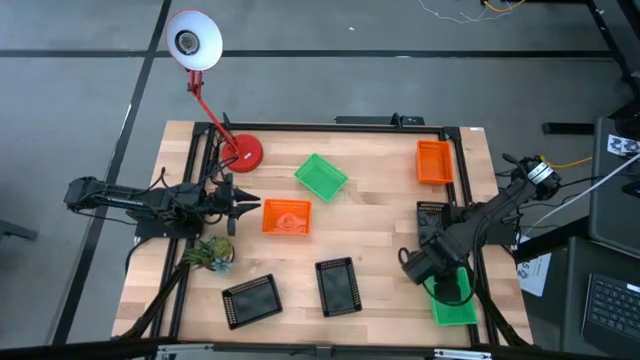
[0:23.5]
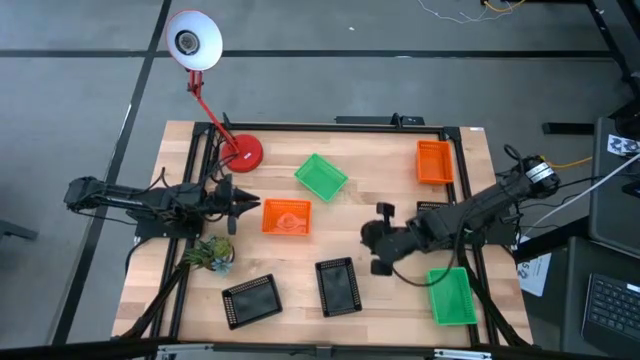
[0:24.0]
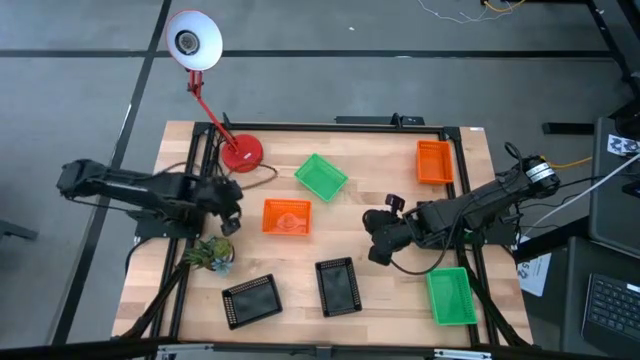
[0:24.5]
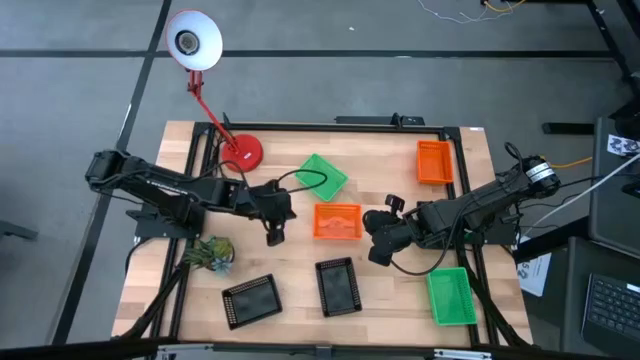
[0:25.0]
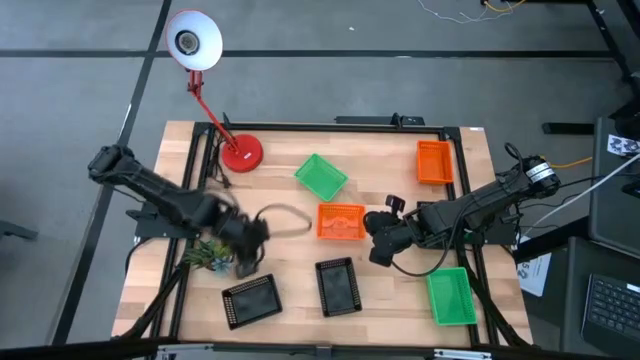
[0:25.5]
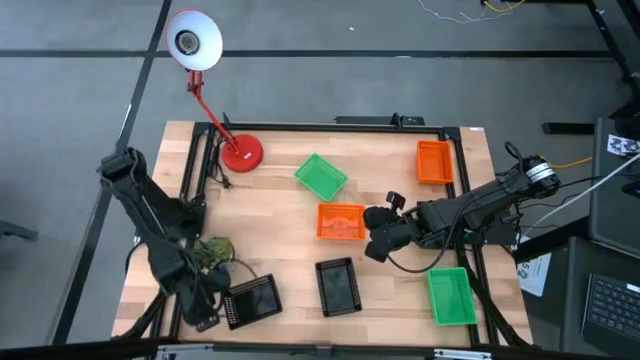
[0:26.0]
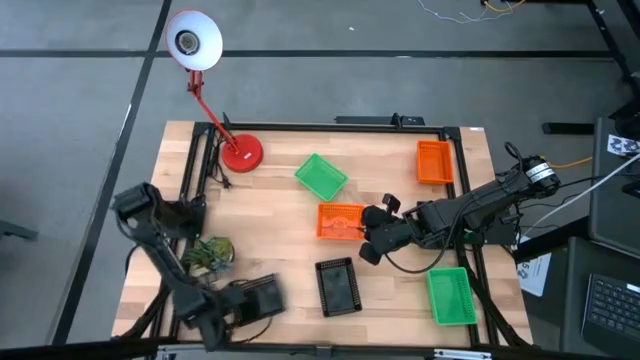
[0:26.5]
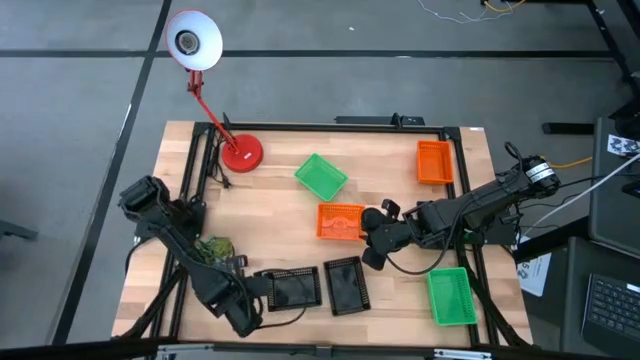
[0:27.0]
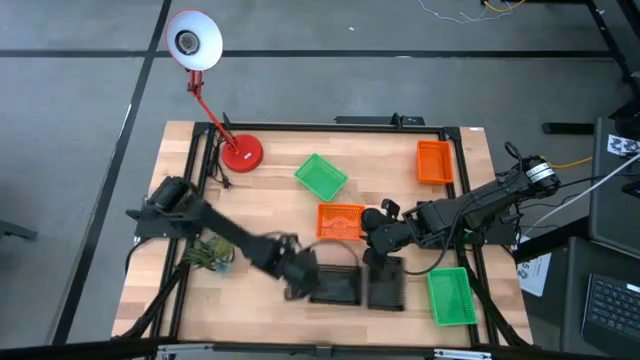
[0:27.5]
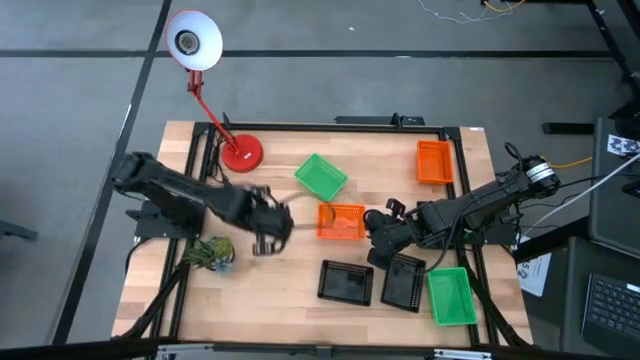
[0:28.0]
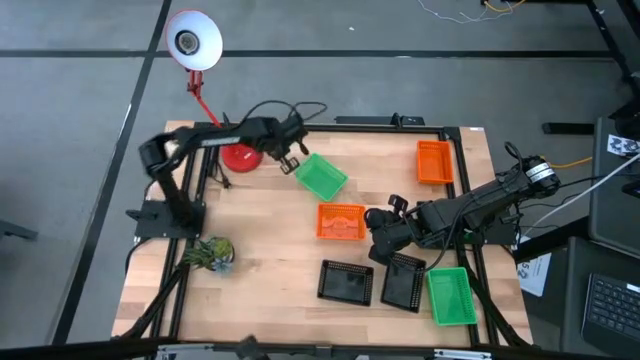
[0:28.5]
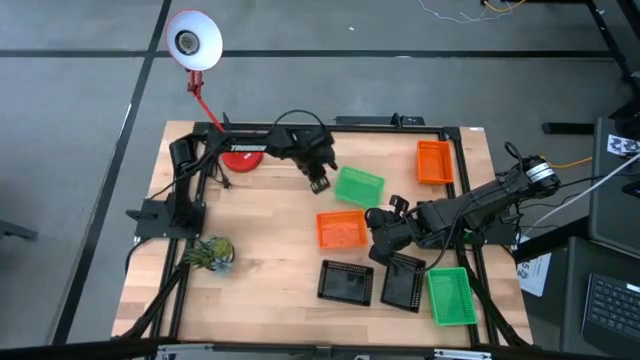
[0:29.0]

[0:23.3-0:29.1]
Adjust the bins

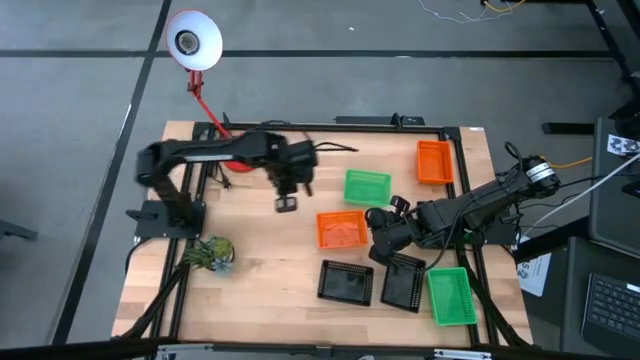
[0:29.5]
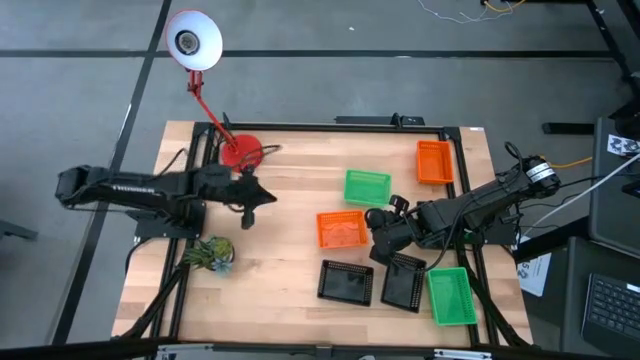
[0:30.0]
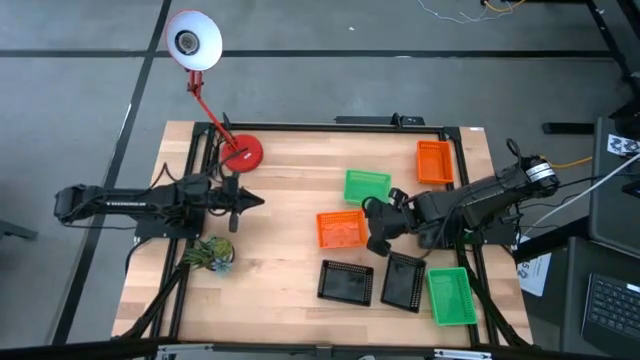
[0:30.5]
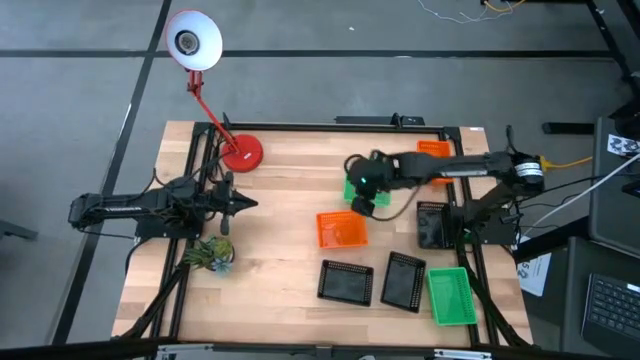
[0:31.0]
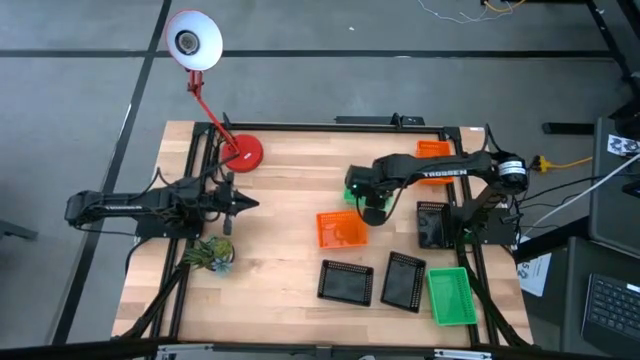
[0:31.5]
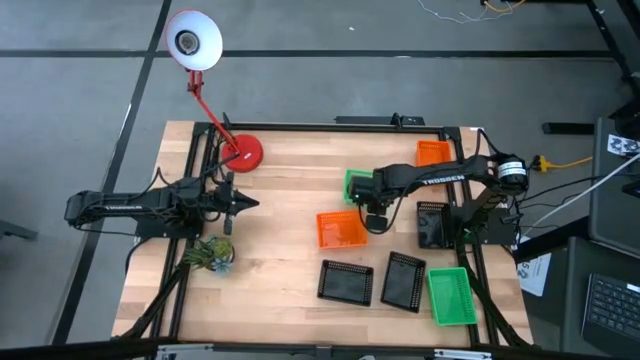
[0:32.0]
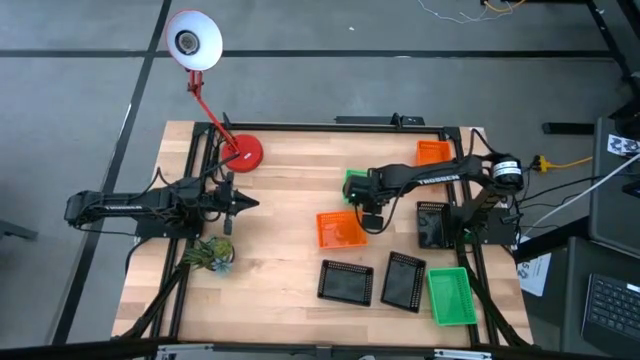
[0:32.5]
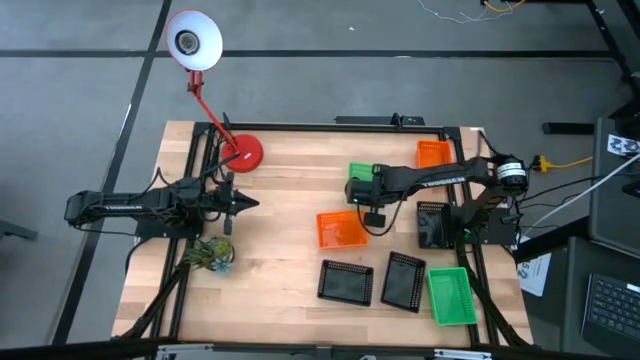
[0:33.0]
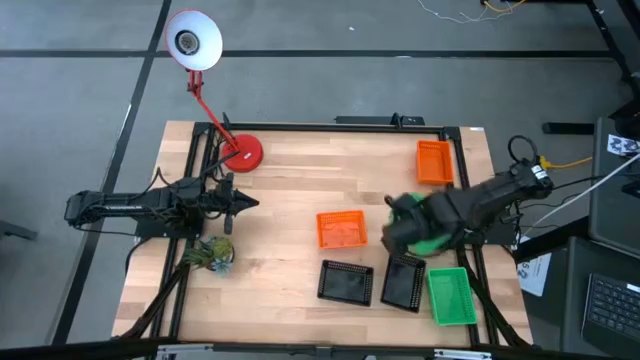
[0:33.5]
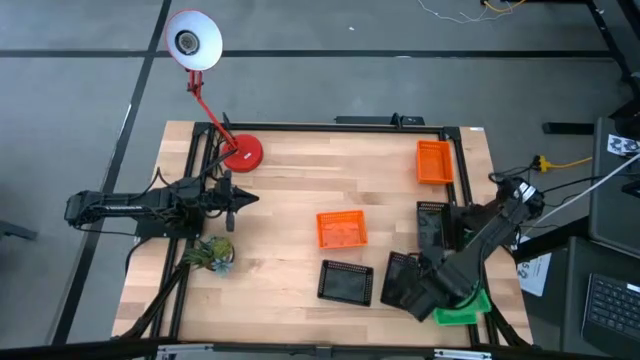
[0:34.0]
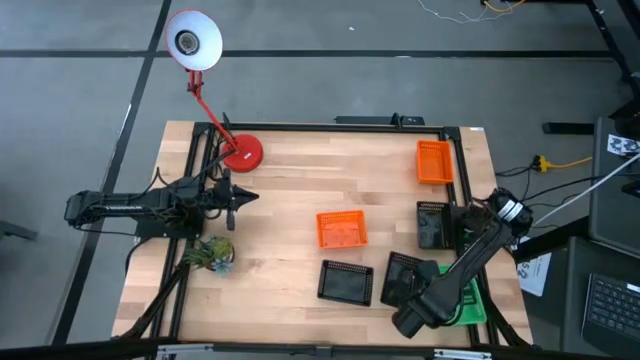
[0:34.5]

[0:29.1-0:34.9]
Stack the top green bin on the bottom green bin

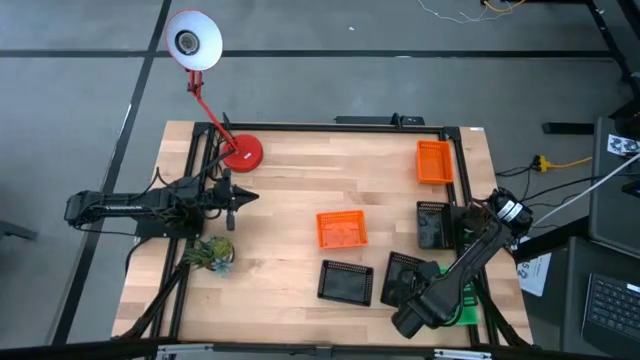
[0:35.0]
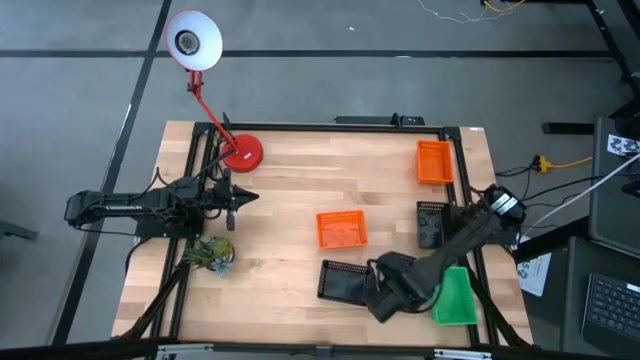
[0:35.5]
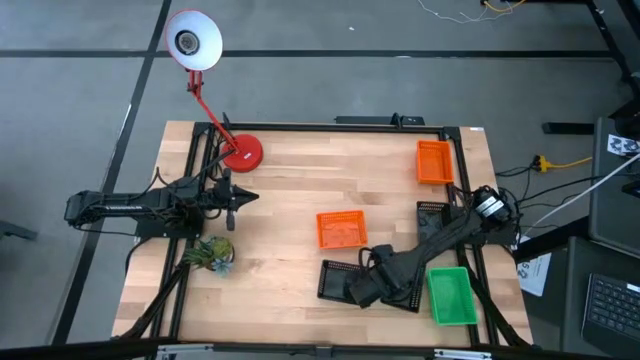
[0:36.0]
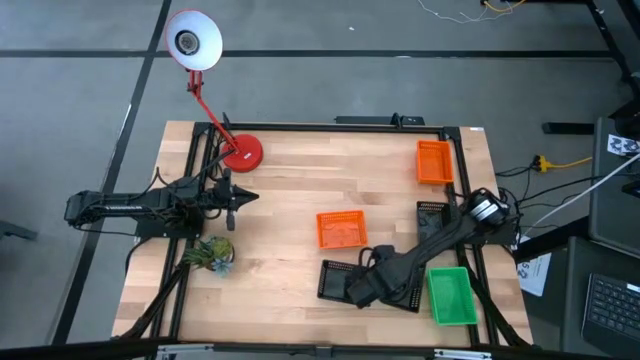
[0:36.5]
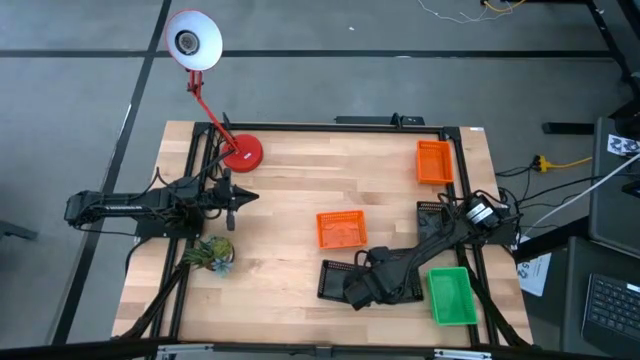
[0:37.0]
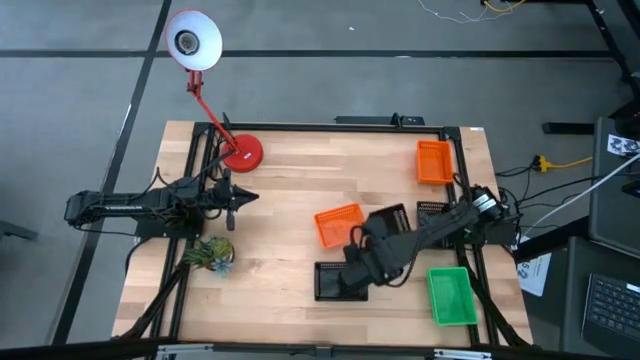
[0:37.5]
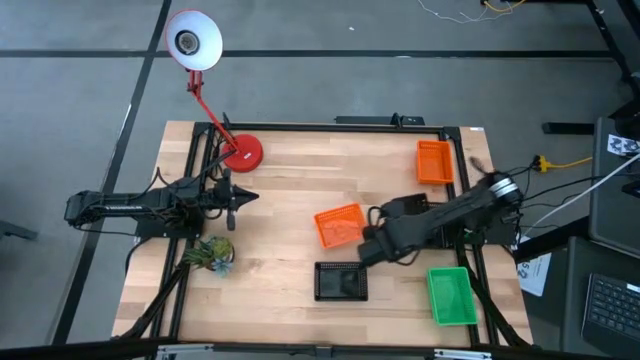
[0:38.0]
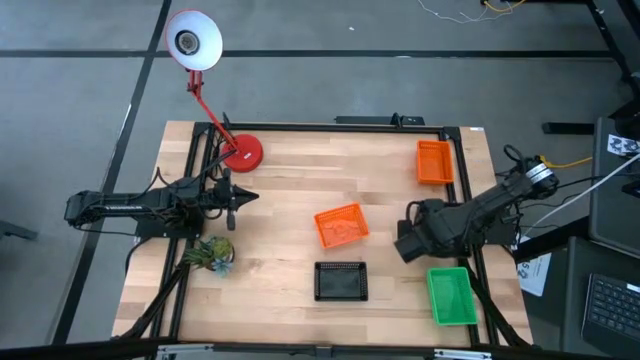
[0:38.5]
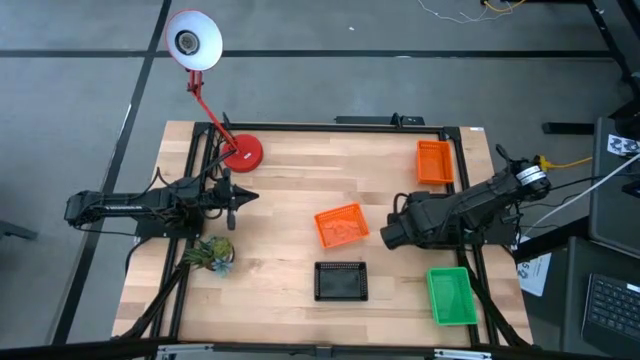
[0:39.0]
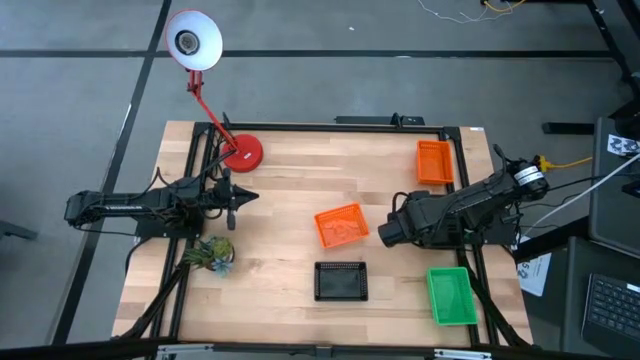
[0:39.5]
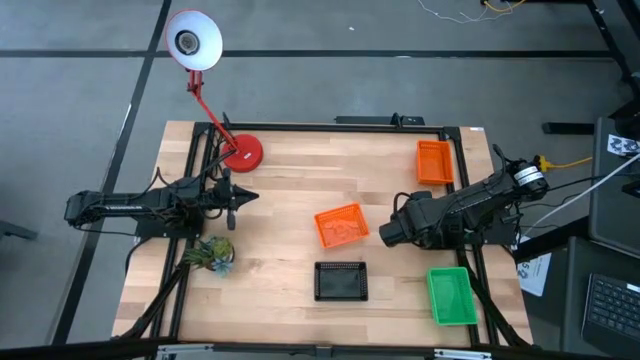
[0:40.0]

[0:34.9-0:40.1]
Stack the bottom right black bin on the right black bin

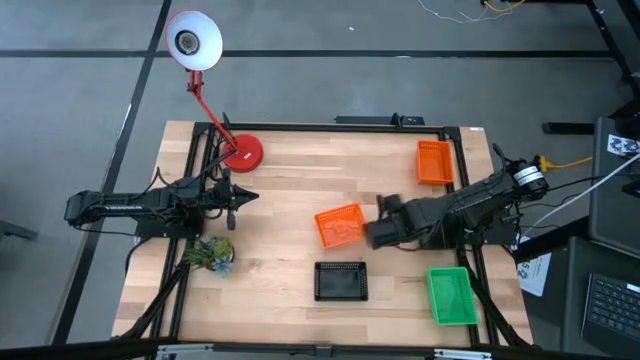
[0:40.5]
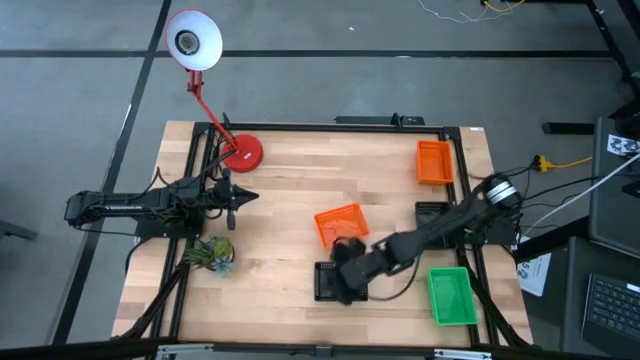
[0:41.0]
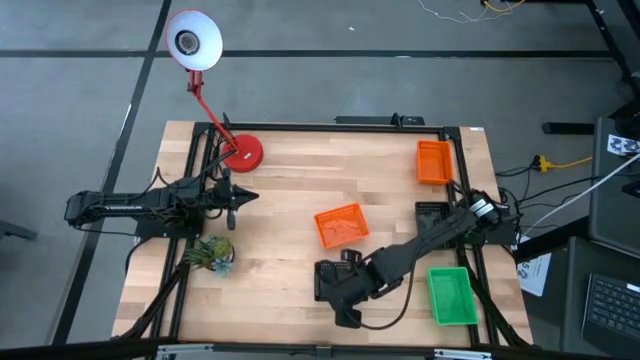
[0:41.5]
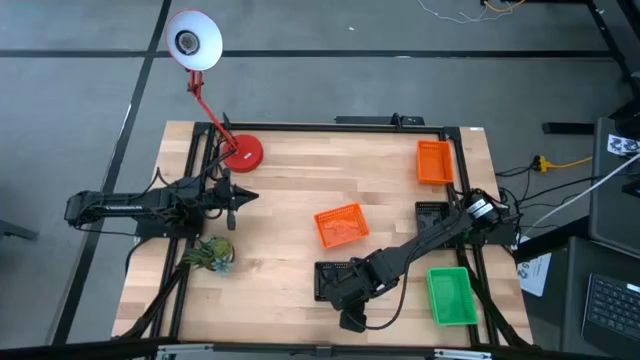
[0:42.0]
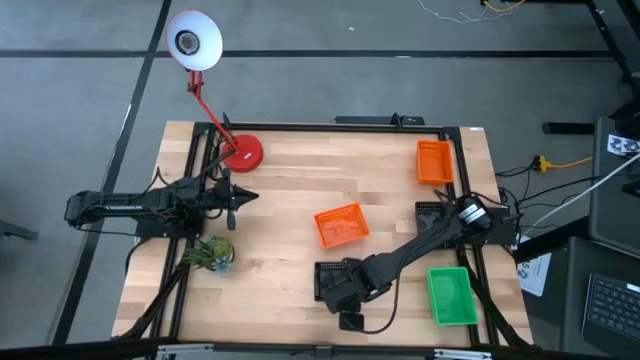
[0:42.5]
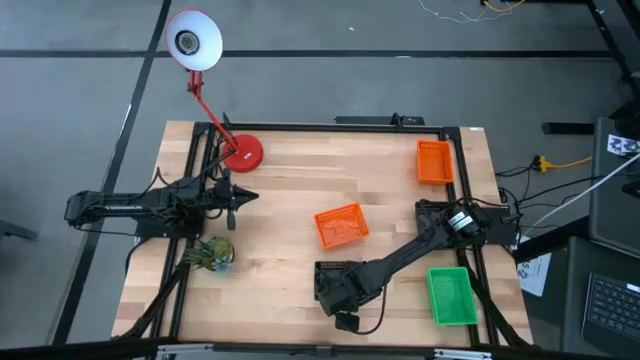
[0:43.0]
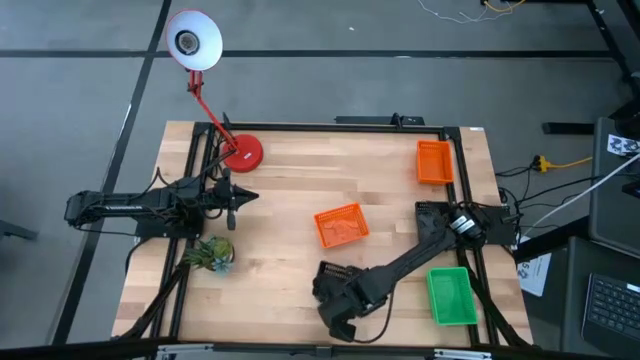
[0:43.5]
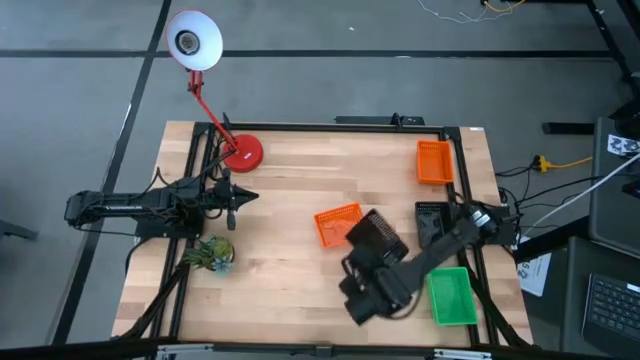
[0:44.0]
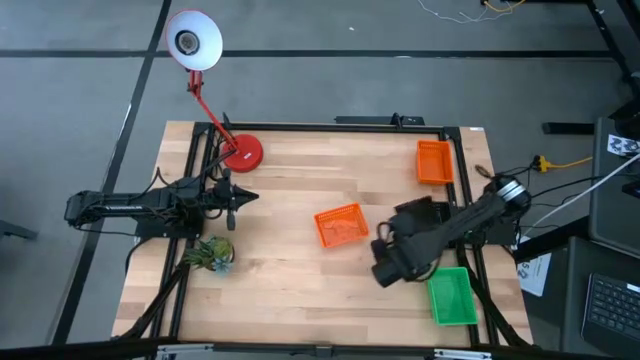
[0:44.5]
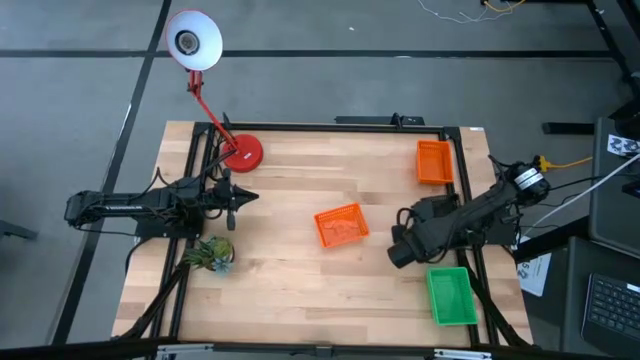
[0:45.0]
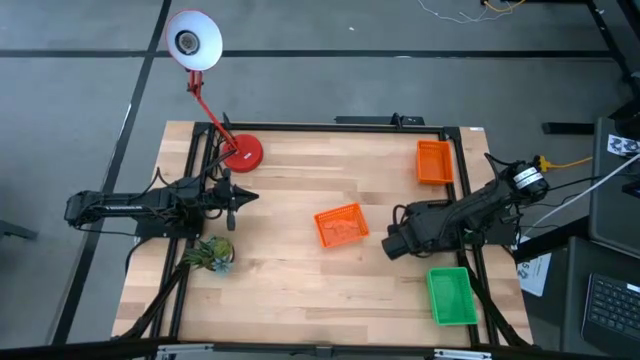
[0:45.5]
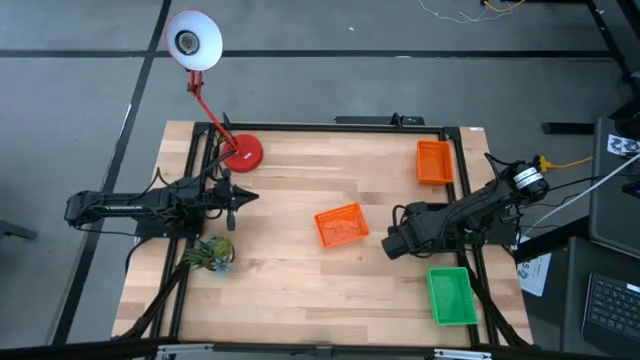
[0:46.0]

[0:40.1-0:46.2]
Stack the bottom black bin on the top black bin
